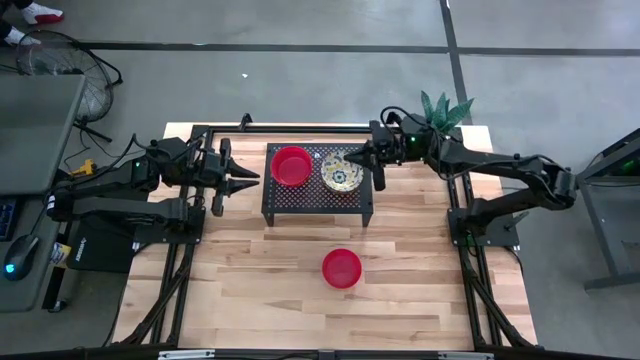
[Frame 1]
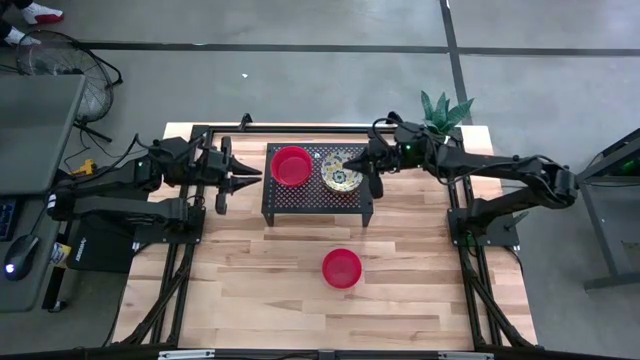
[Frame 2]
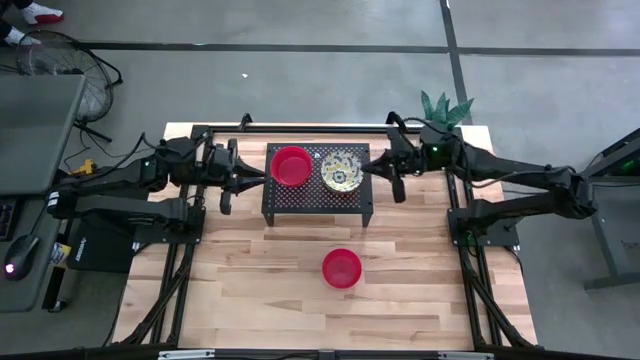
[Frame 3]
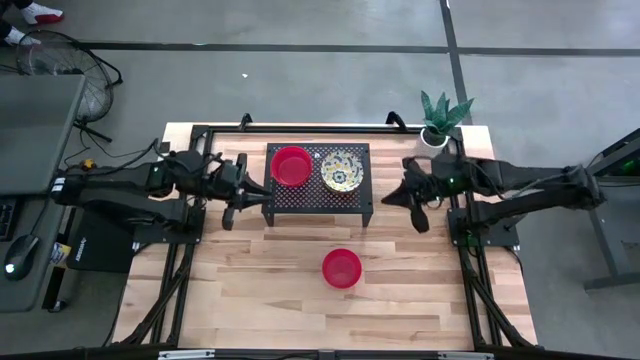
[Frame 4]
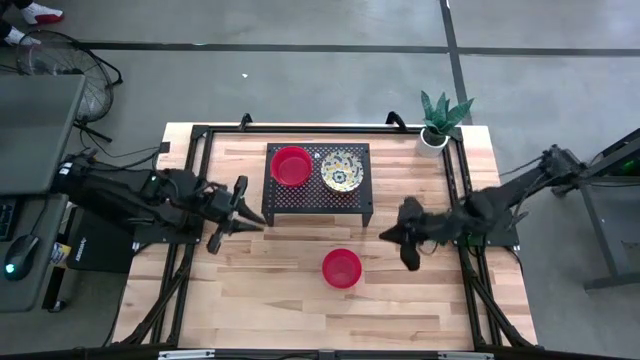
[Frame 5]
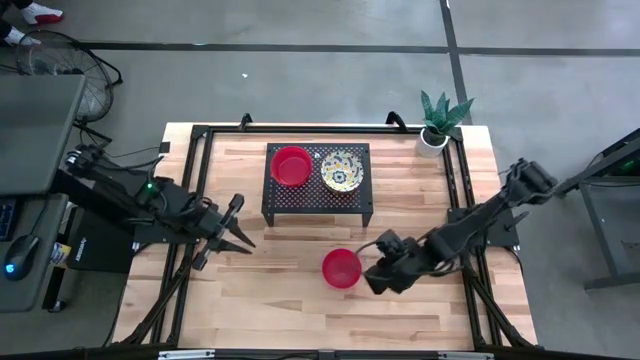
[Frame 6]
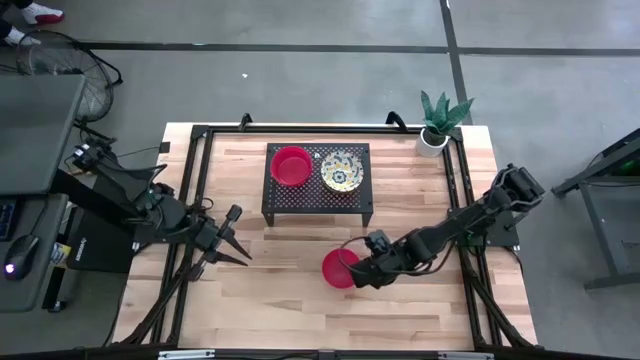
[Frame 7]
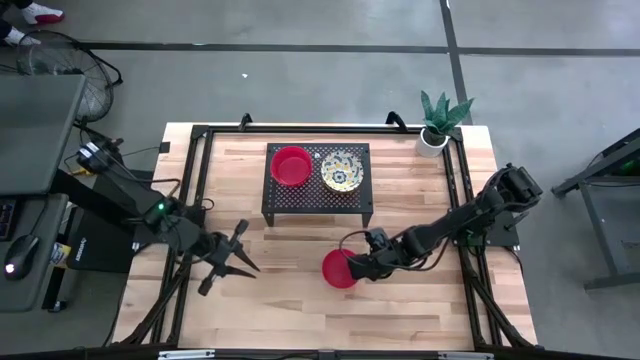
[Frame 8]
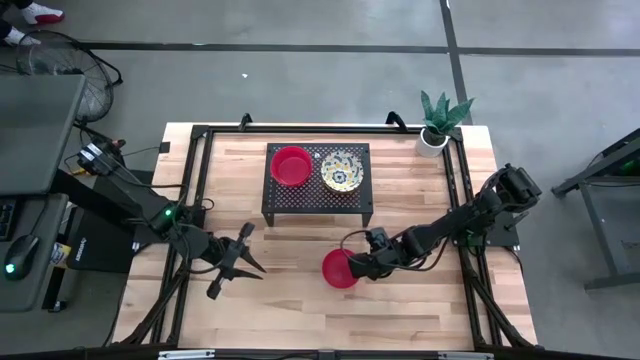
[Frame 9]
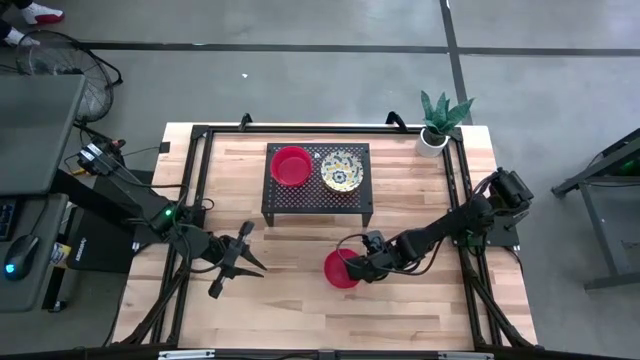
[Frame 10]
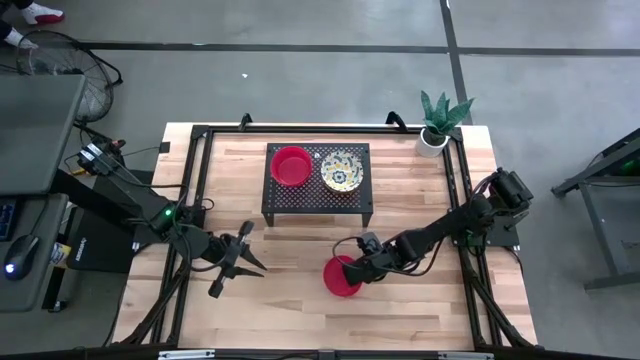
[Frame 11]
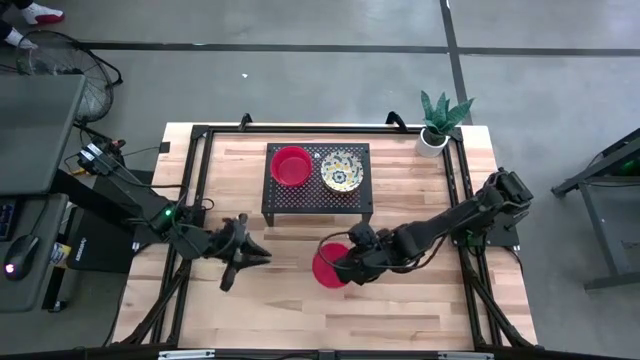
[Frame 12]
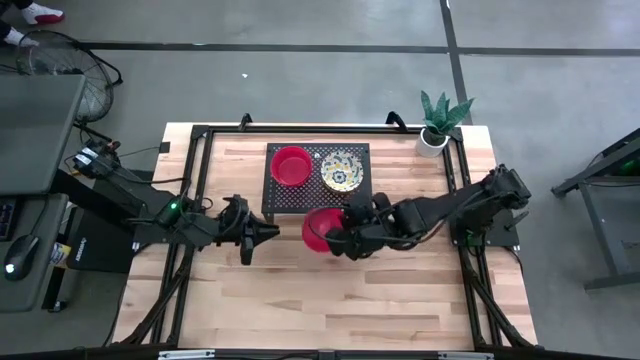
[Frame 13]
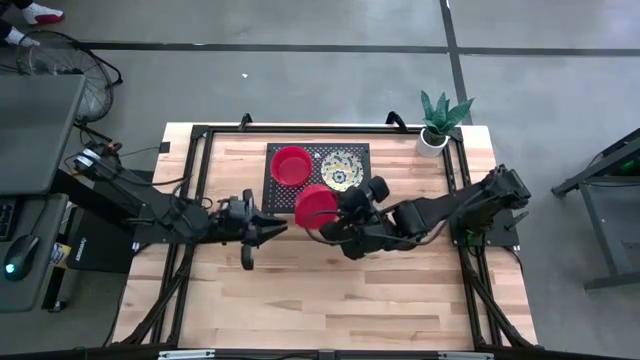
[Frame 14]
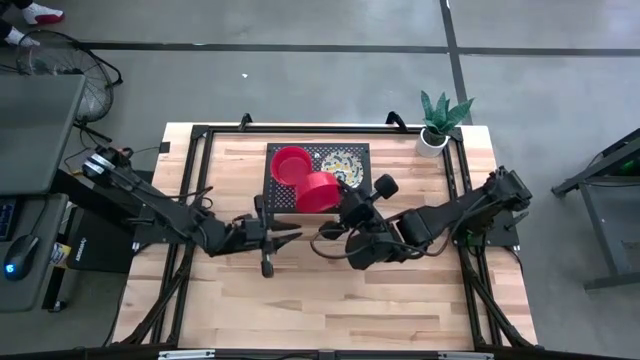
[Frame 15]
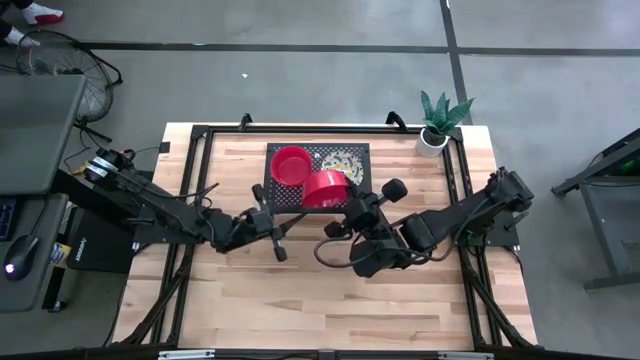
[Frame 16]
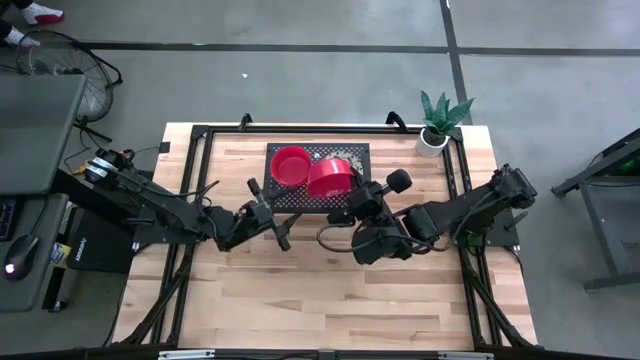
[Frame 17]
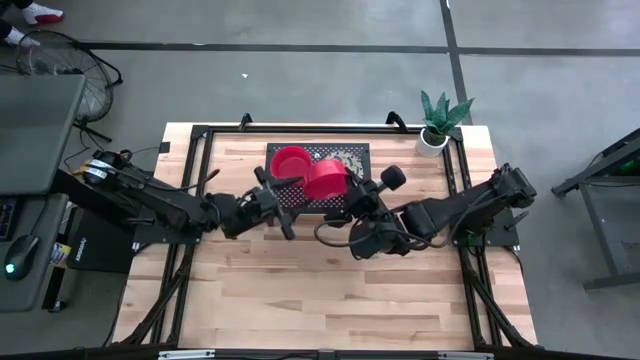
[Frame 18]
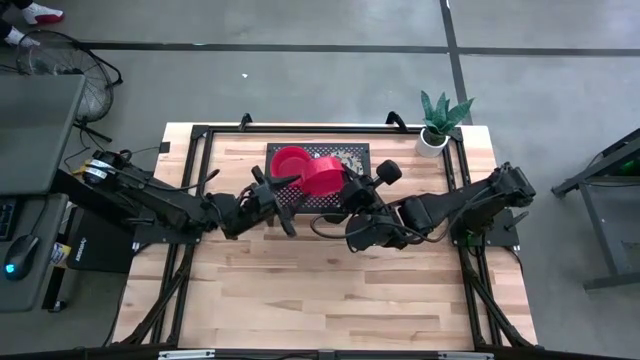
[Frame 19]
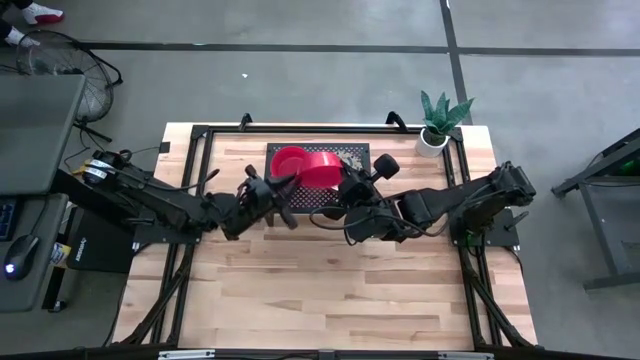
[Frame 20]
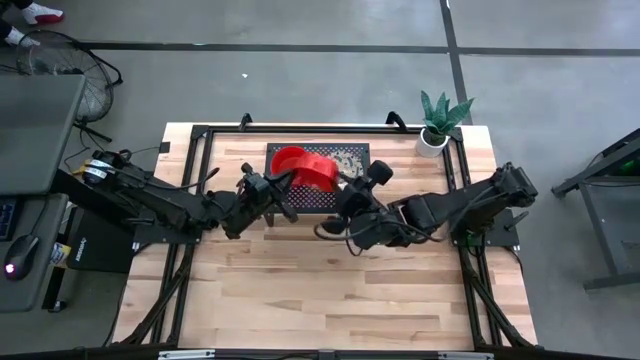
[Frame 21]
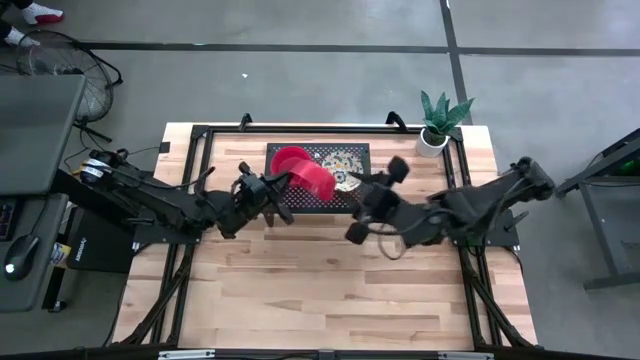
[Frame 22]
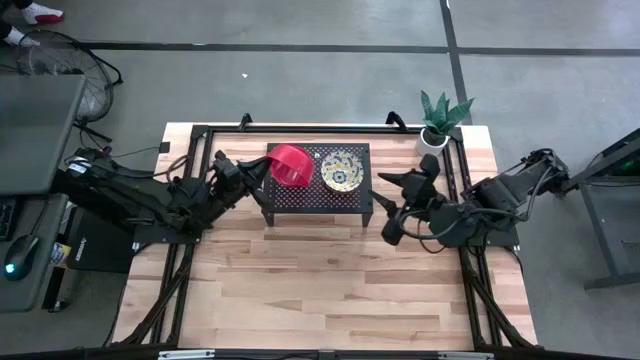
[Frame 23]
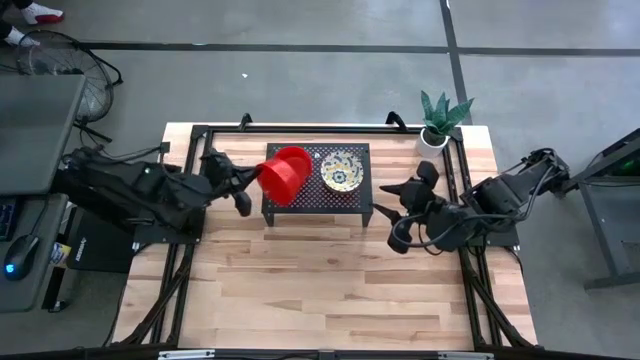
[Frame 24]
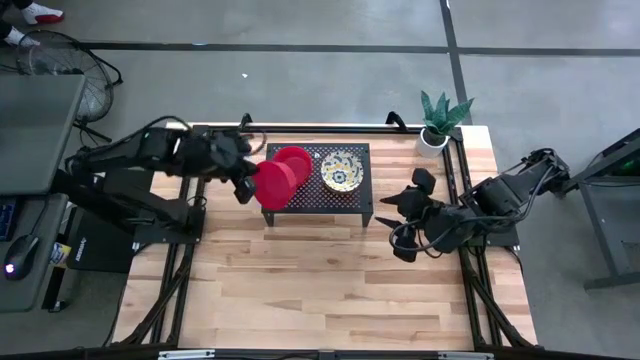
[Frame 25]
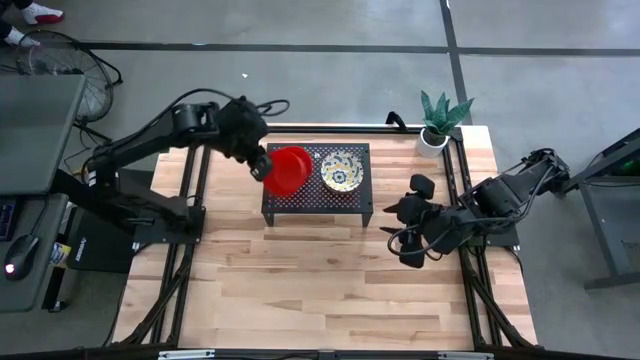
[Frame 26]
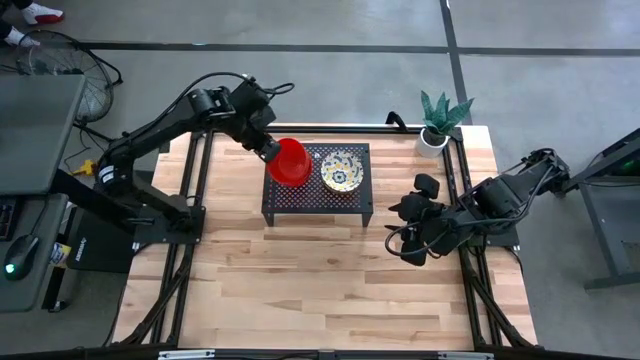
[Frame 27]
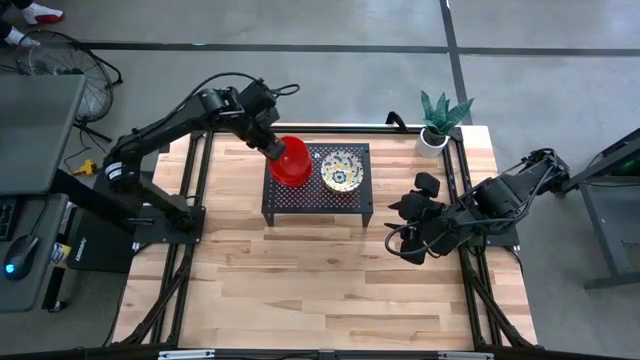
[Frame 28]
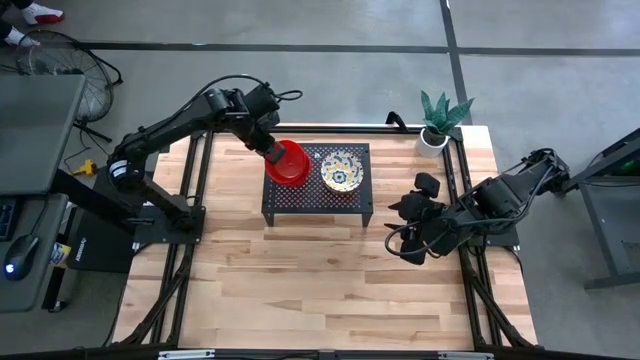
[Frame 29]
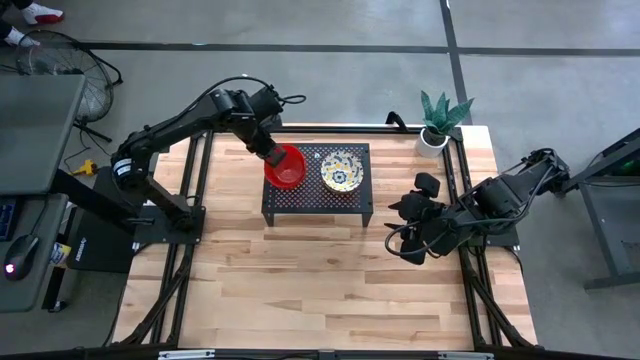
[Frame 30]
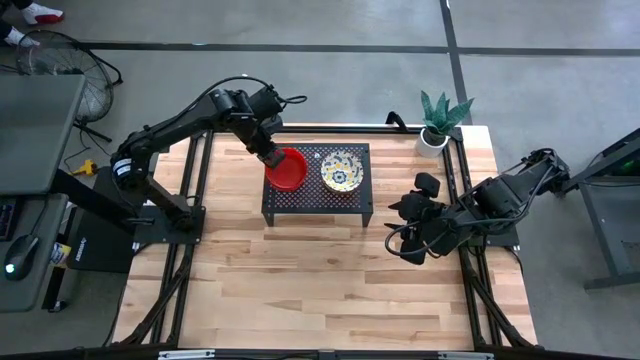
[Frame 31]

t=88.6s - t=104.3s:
Task: Pick & Place Mini bowls
Stack the red bowl on top of the other red bowl on the shelf

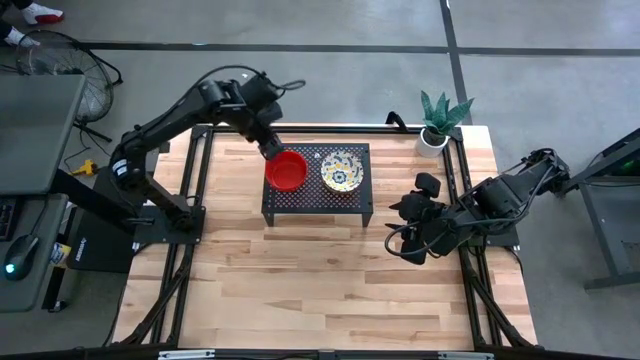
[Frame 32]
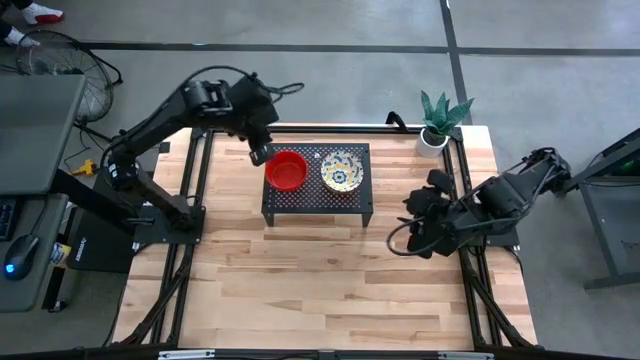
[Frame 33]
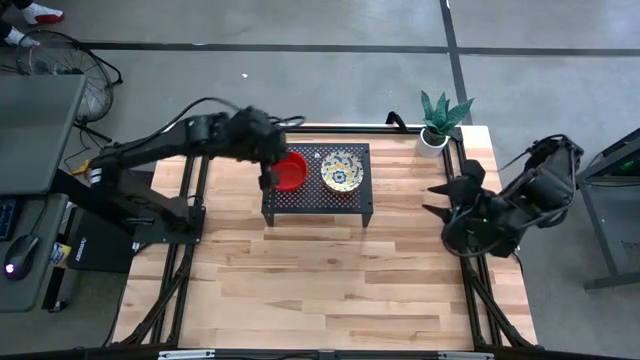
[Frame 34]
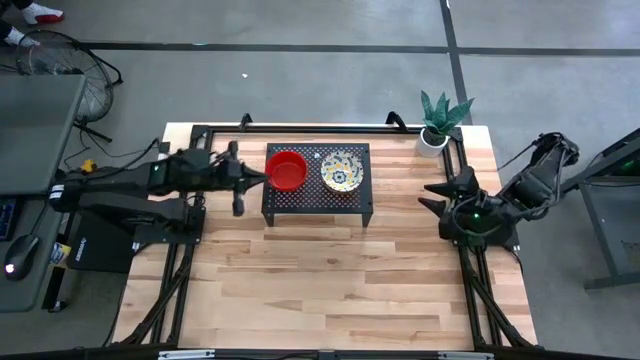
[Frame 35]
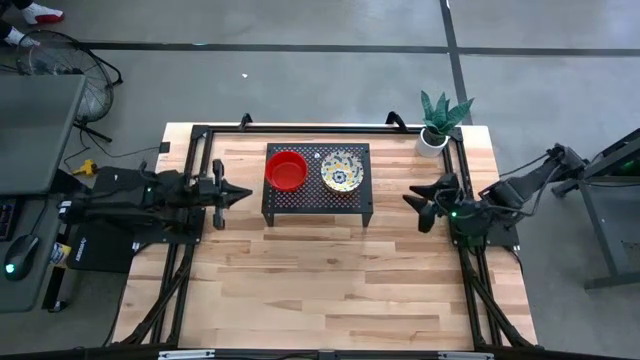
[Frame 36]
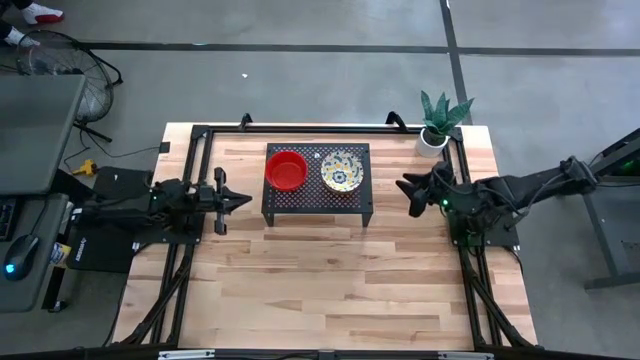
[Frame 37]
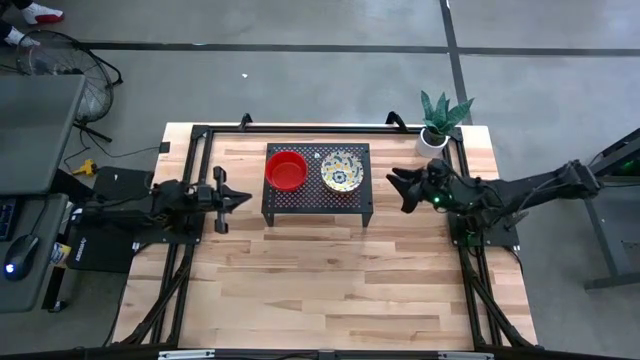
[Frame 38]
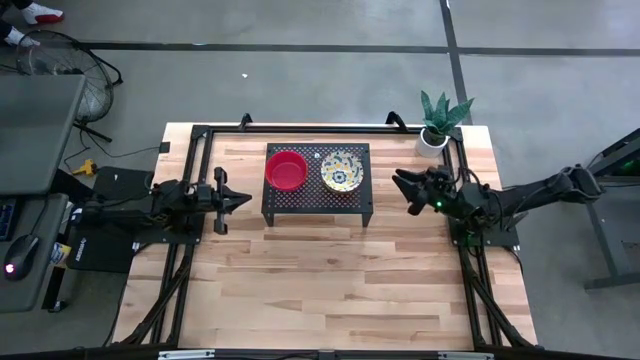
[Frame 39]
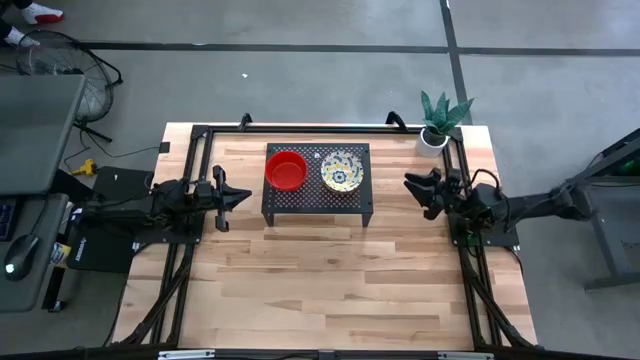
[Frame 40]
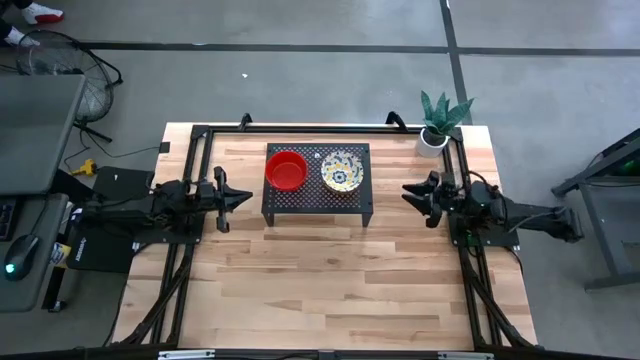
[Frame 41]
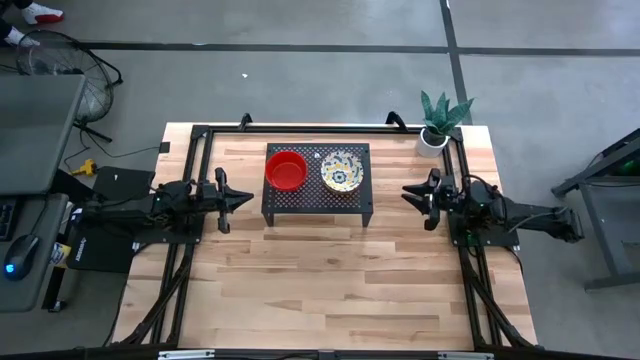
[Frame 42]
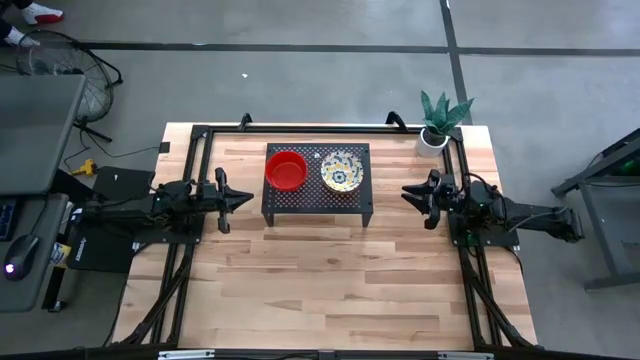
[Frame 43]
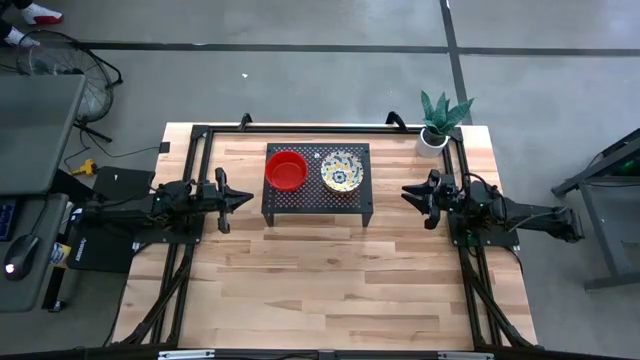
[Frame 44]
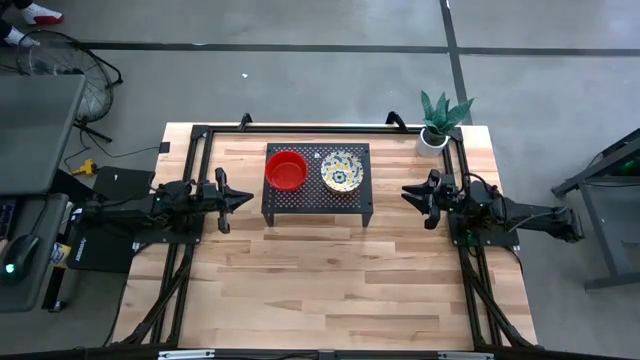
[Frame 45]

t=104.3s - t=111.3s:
Return to Home Position

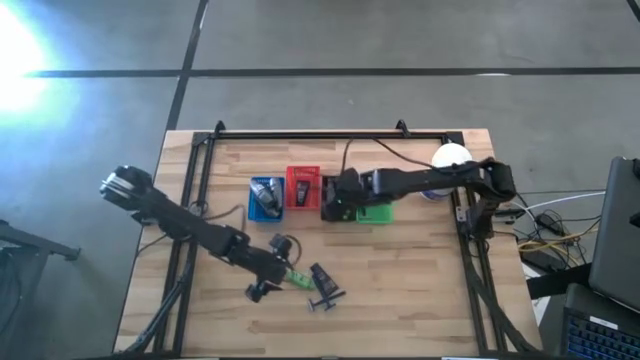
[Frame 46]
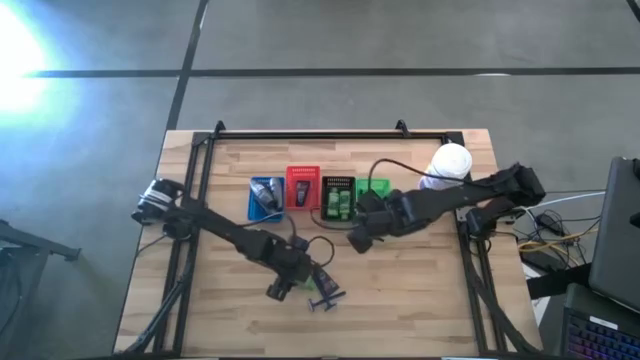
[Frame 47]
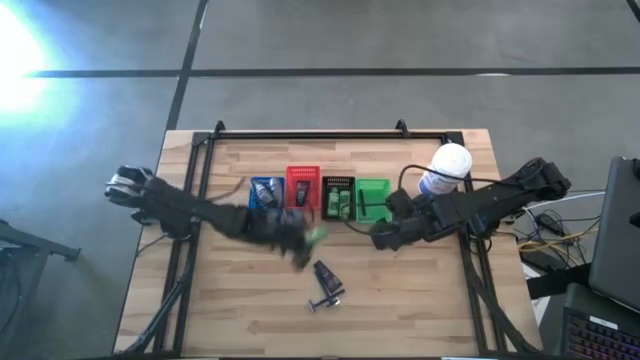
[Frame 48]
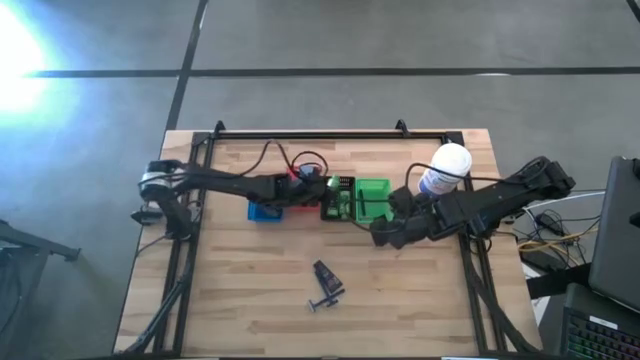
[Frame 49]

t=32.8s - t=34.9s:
Task: Pick & Place Travel size toiletries
Put the green shampoo into the black bin
